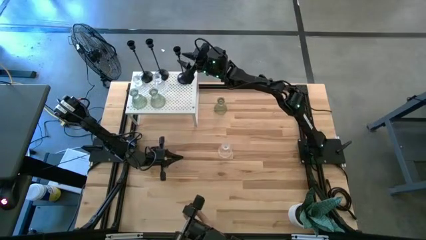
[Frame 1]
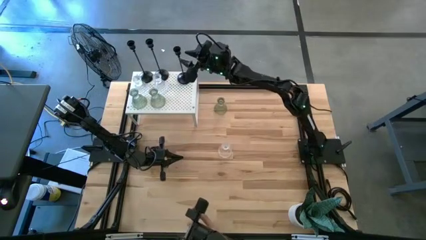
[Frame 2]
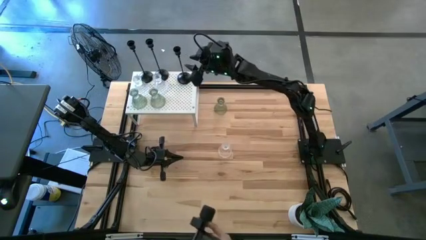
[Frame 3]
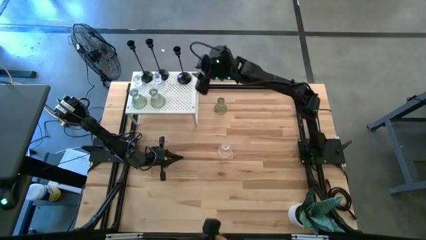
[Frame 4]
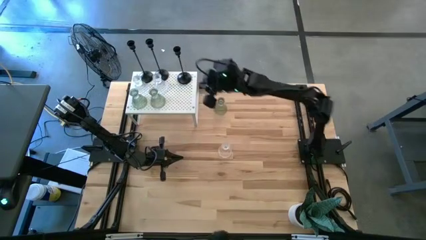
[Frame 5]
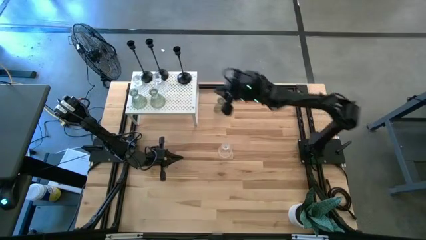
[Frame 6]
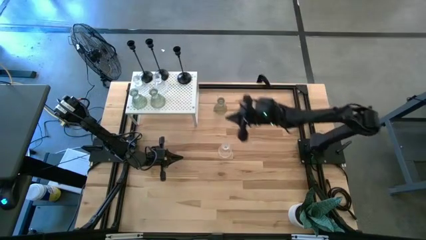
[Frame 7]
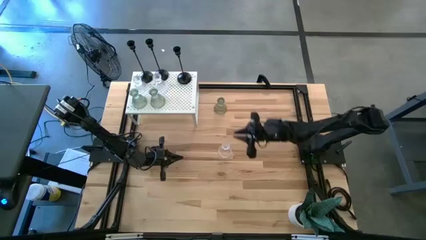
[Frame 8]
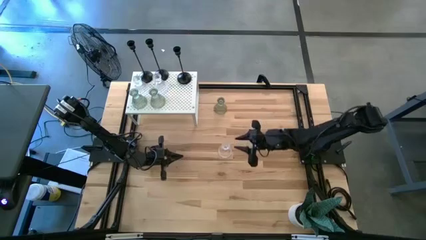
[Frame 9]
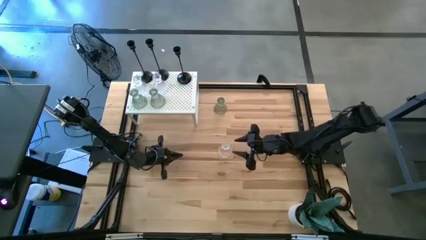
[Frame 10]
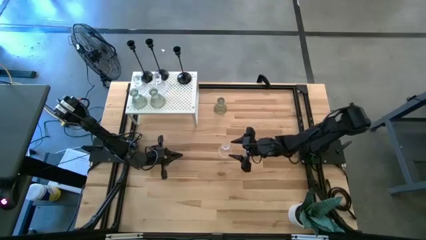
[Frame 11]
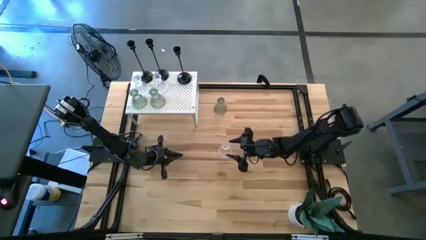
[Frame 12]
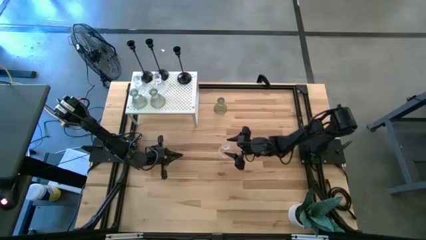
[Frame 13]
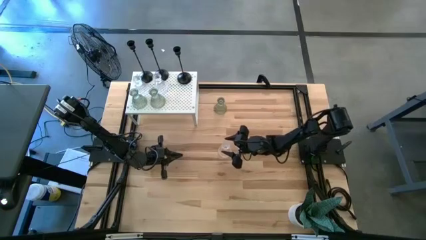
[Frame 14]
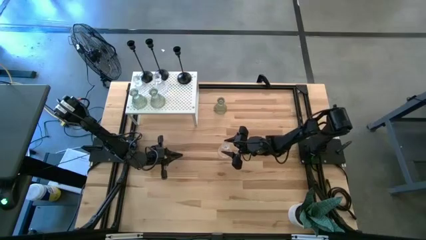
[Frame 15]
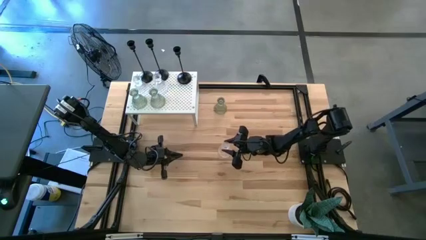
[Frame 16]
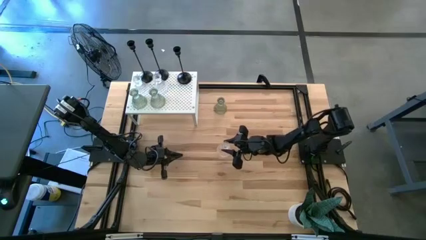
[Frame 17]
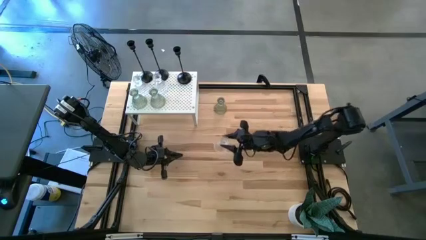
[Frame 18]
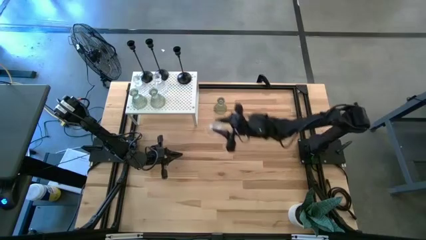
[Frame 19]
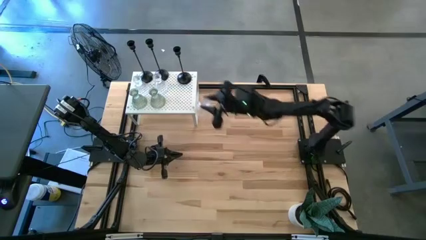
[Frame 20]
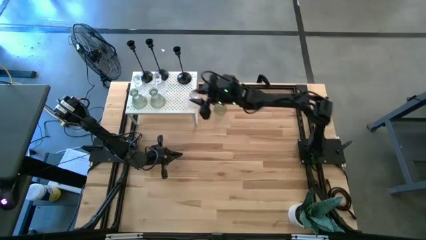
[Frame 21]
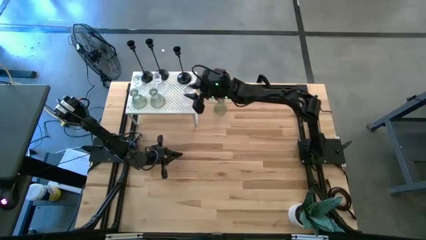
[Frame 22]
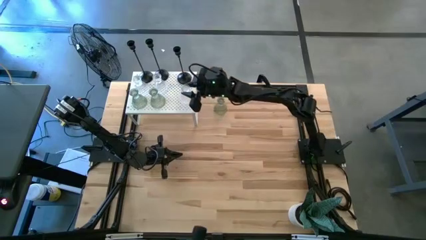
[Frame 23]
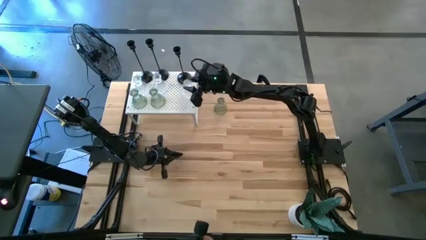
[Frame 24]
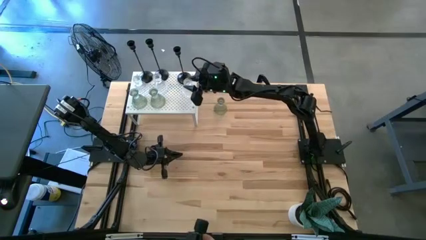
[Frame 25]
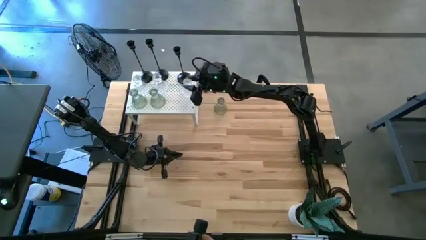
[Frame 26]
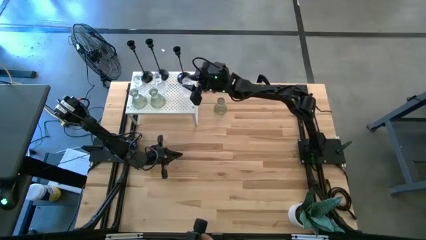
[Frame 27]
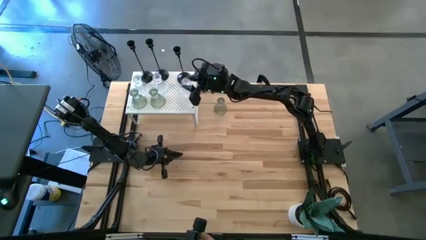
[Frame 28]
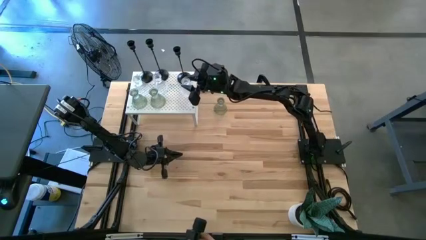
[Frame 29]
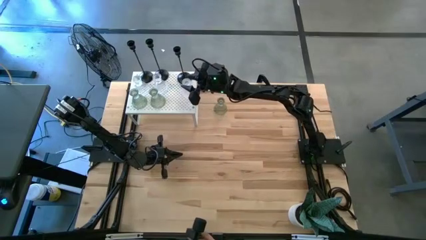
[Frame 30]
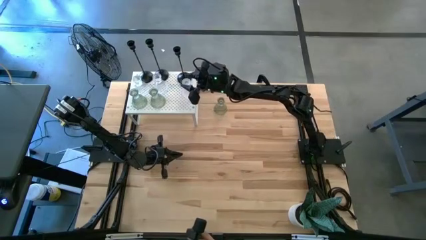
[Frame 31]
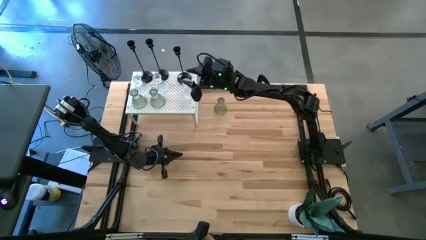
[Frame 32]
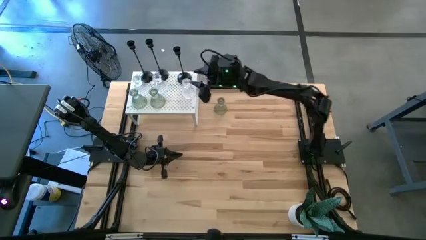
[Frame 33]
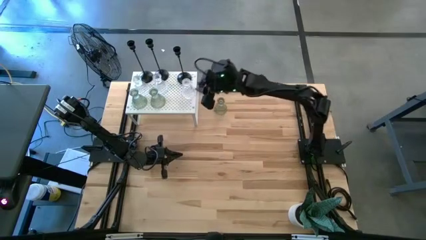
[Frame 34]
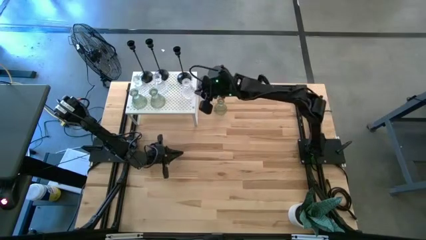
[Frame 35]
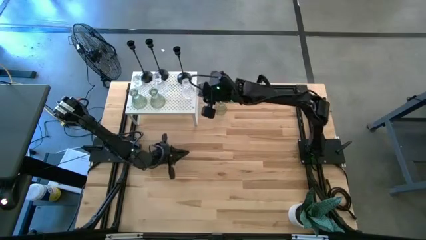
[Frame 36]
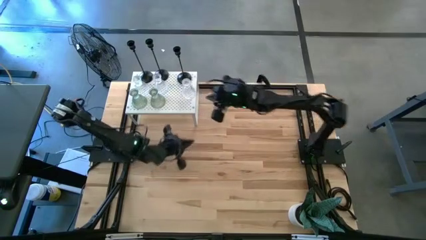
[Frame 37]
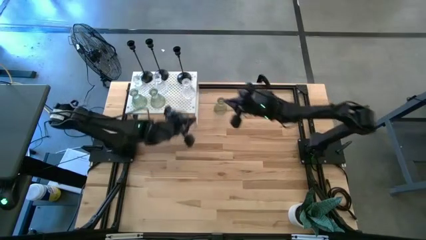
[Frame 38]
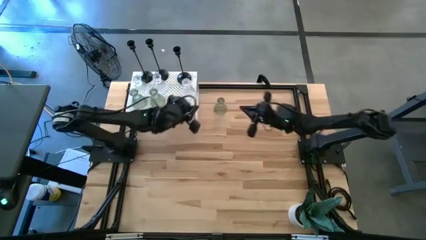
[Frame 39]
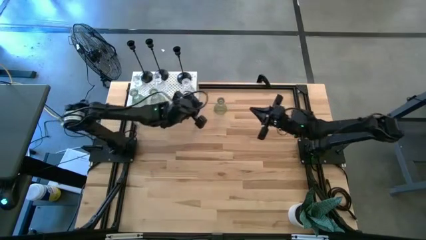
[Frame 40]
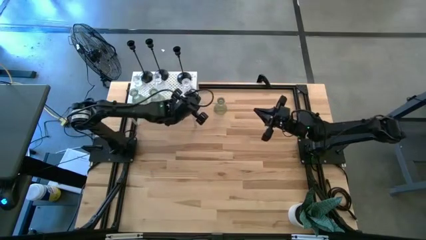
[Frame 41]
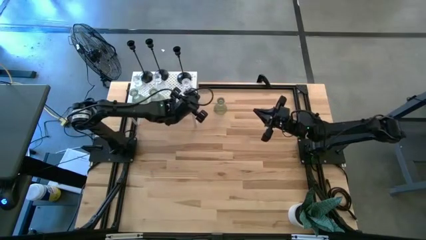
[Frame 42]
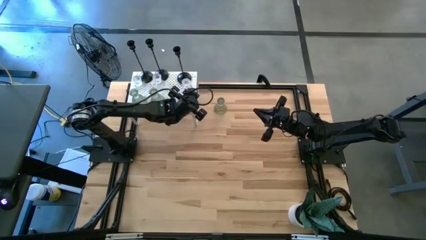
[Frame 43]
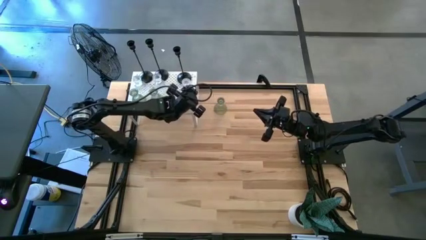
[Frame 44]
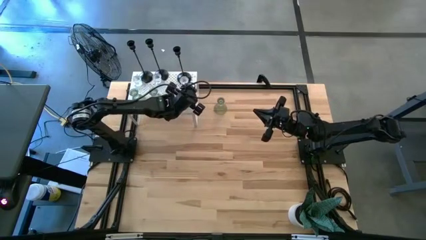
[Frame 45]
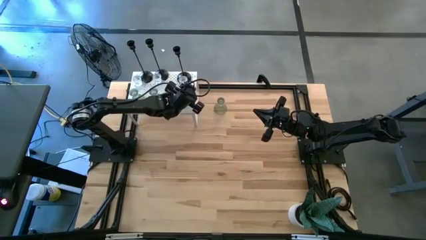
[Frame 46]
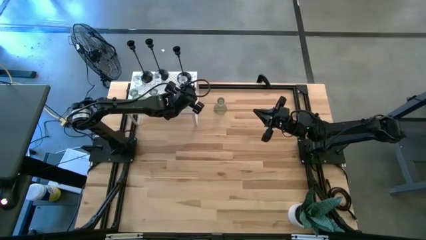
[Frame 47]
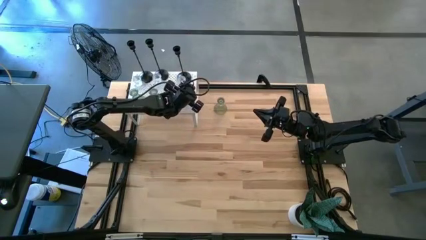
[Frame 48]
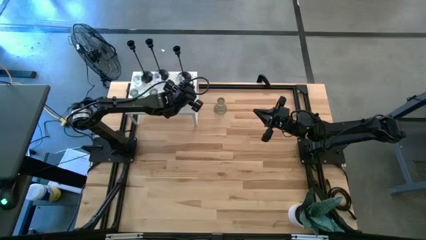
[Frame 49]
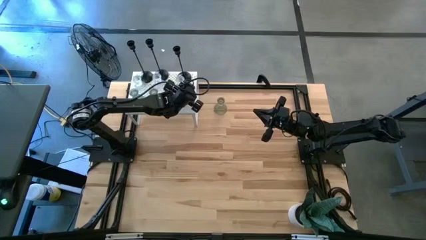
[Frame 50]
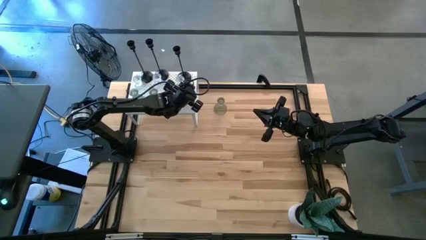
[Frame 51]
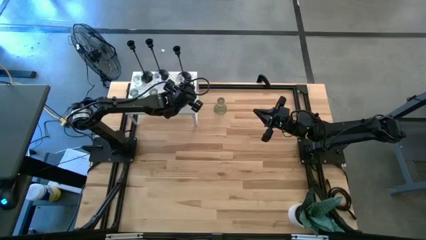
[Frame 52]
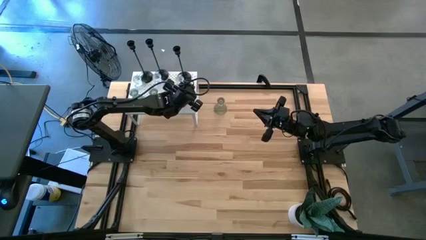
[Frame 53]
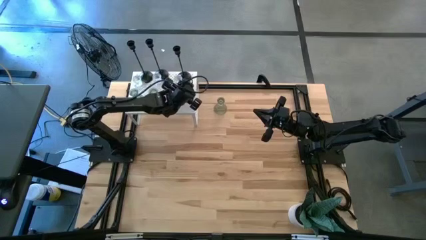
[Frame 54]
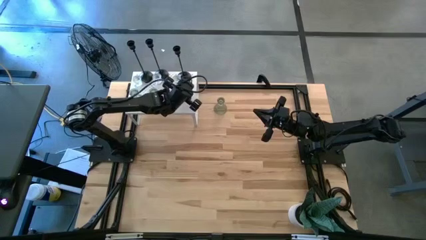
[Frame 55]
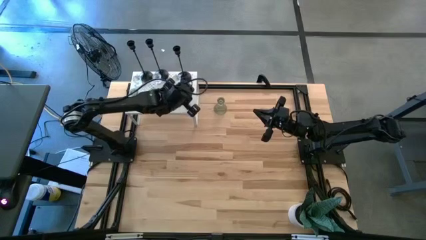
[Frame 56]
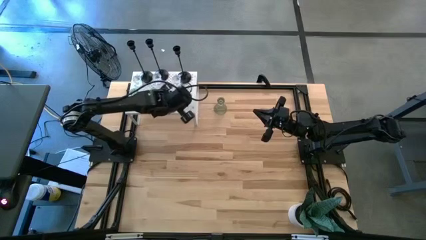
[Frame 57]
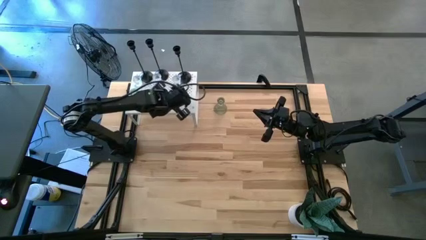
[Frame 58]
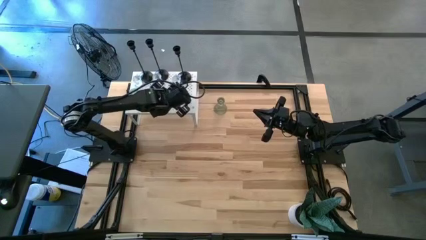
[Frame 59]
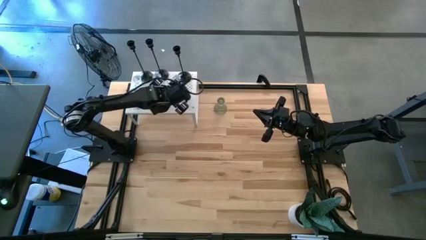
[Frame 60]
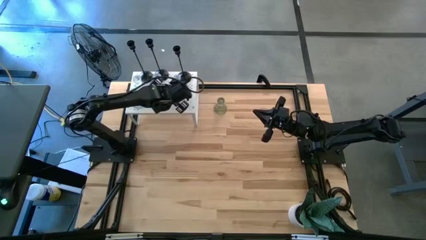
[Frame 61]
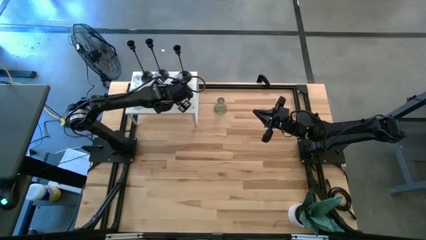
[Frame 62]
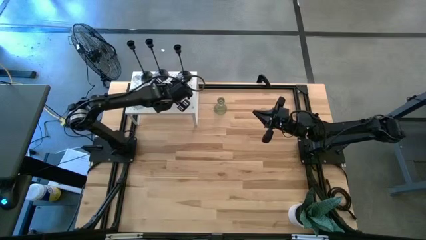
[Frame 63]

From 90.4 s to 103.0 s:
Task: Pick & Place candle stick holders
Put the transparent candle holder on the shelf aligned with the transparent candle holders

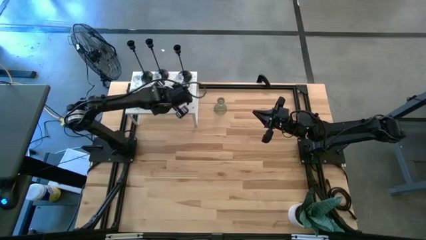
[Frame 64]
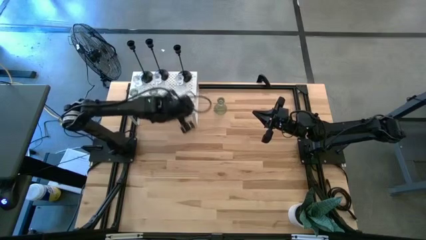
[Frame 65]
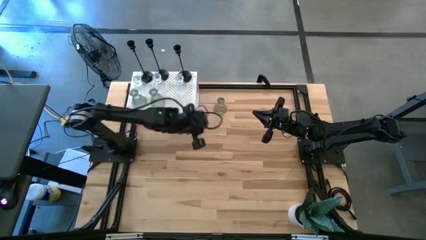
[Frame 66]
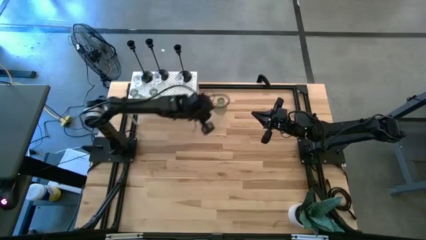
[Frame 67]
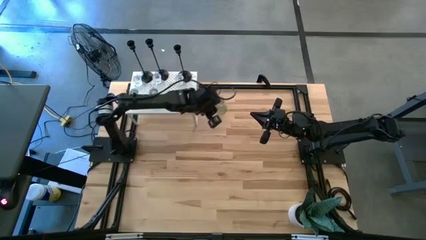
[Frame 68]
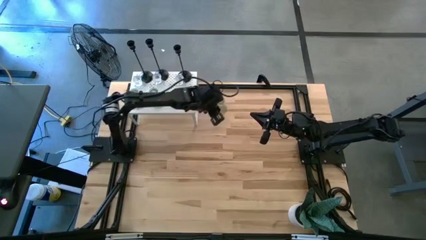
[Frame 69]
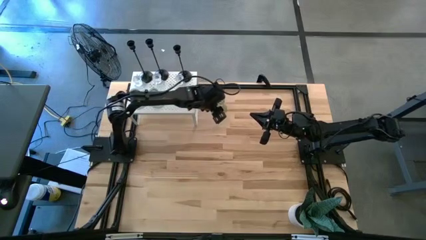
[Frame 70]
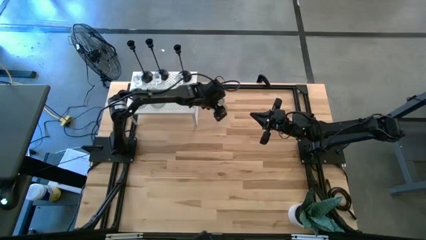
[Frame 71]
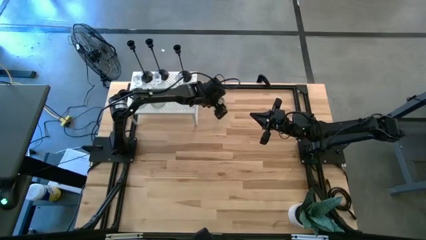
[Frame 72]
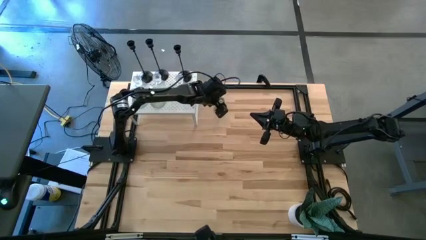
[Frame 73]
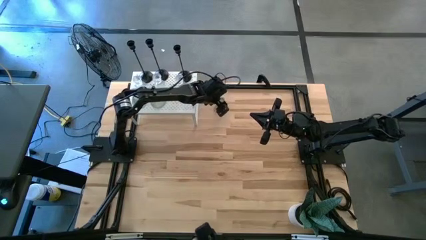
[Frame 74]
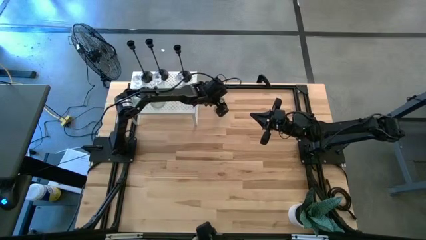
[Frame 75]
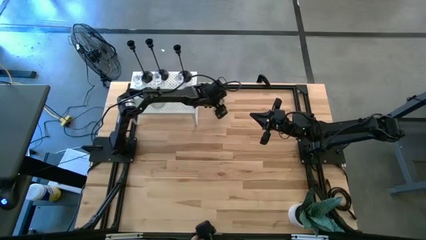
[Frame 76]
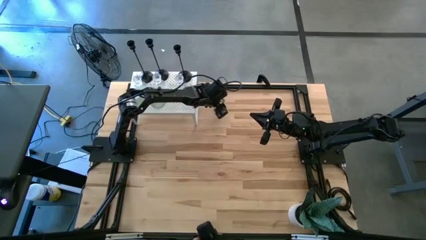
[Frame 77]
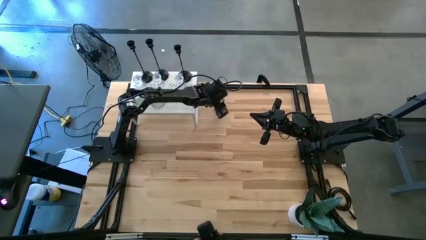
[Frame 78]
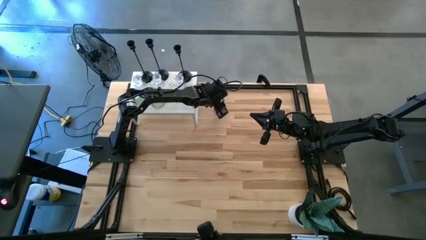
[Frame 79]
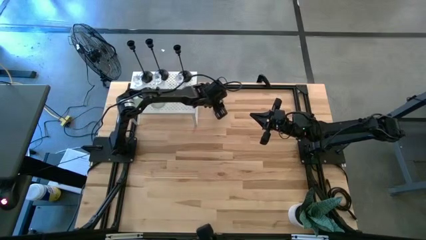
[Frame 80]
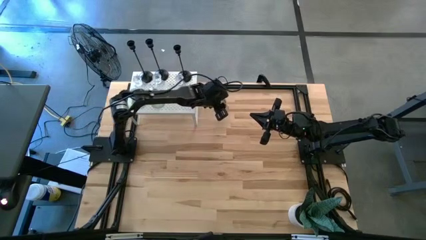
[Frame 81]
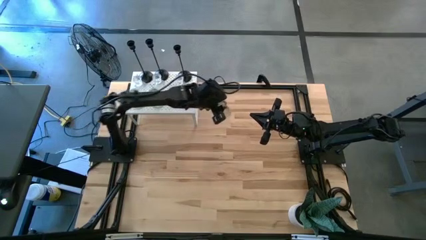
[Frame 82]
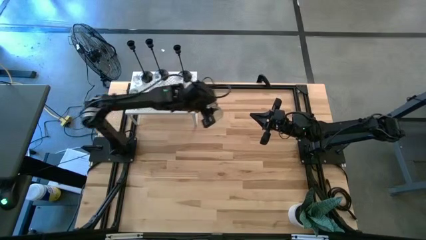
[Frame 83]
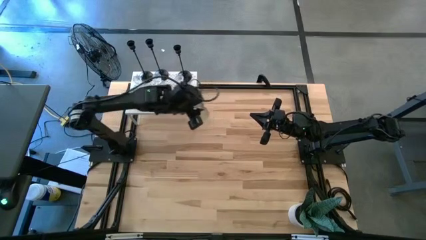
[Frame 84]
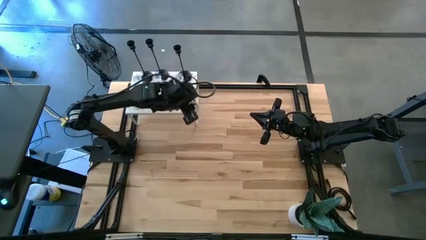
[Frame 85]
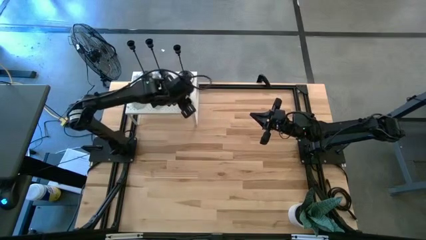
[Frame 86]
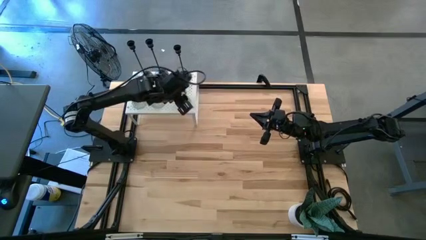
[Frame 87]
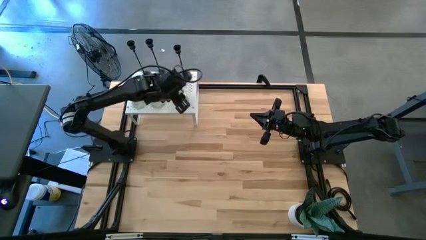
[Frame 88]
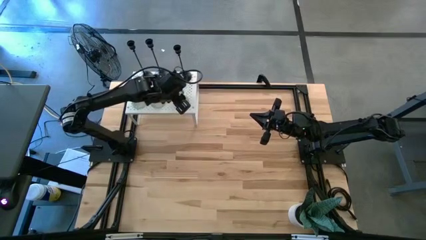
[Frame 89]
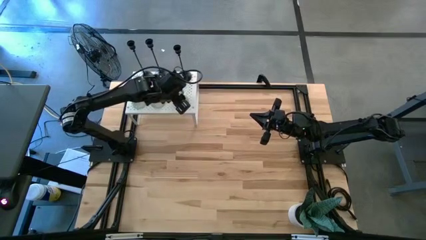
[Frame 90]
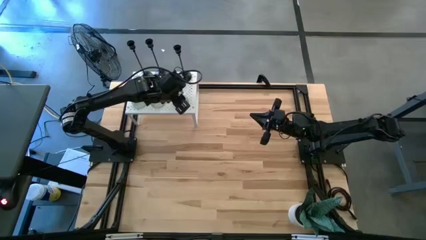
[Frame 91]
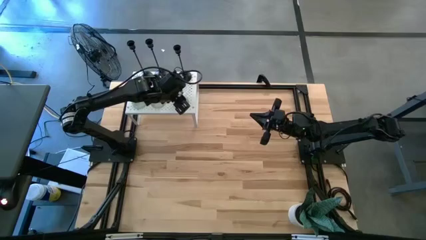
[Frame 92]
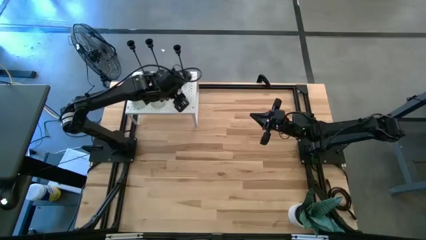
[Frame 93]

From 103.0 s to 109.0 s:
Put the green candle holder on the shelf aligned with the green candle holders
